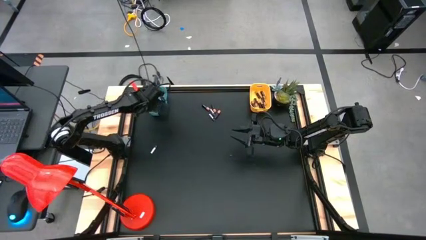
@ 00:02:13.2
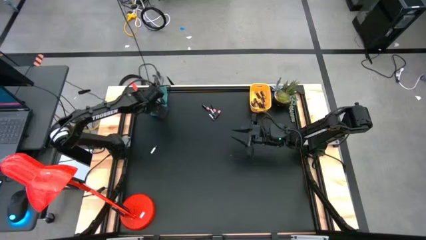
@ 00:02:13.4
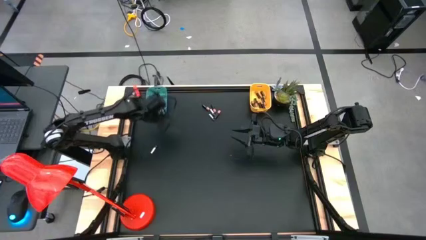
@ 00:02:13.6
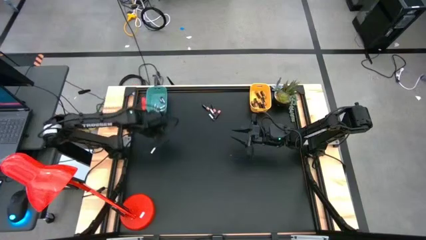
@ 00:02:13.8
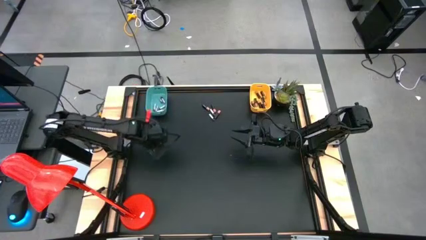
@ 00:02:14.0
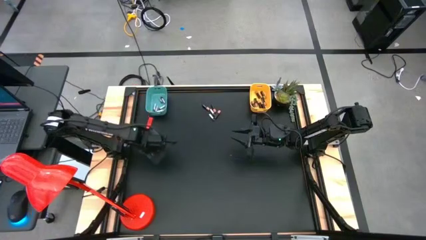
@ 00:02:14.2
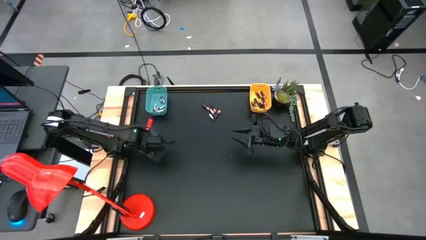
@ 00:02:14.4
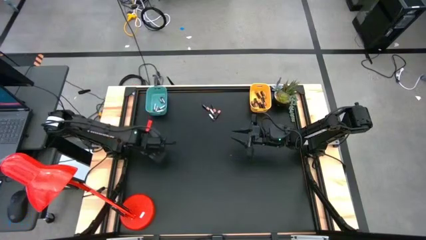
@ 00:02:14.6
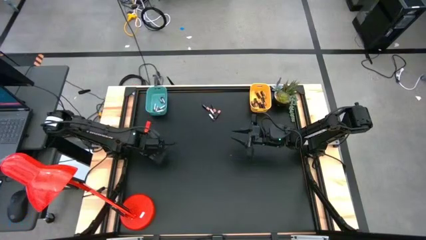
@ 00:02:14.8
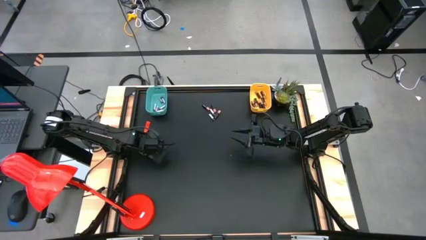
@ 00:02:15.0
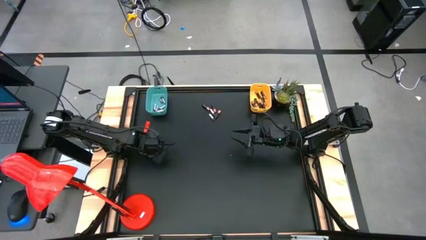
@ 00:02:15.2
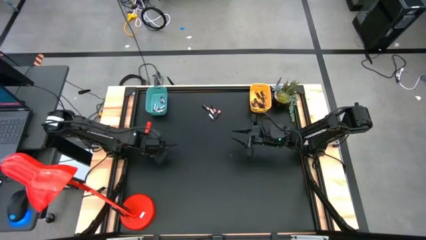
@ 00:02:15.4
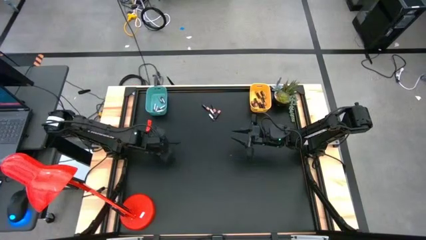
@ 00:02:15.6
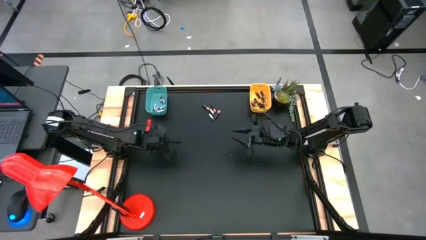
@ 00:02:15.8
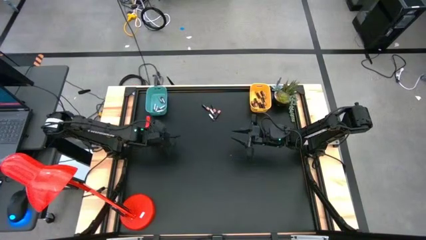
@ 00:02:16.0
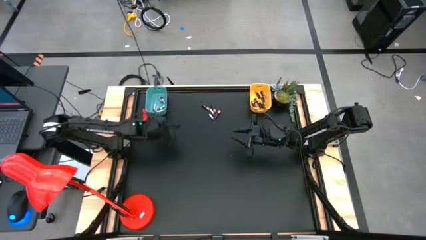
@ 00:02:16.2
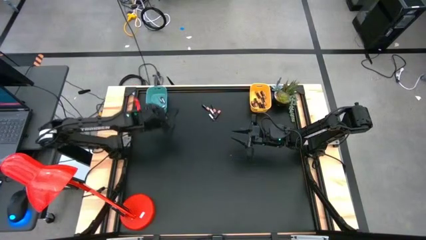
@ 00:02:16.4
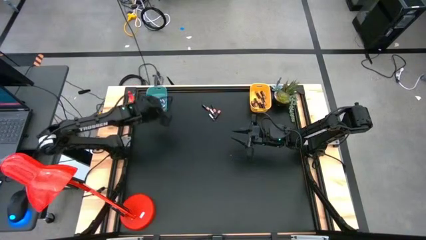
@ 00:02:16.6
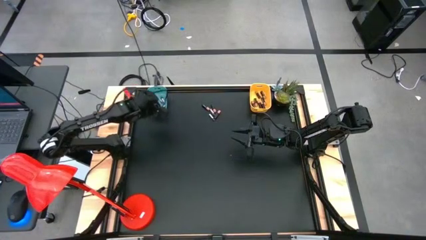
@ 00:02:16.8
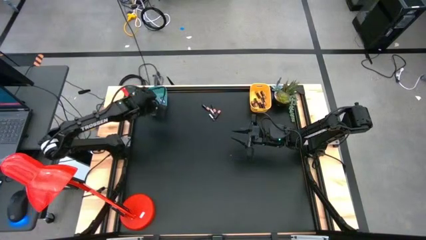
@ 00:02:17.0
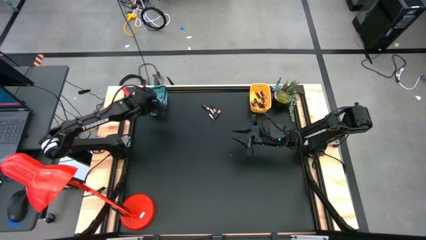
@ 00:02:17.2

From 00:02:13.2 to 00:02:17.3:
Task: Sort batteries
Put the silver battery into the blue bin

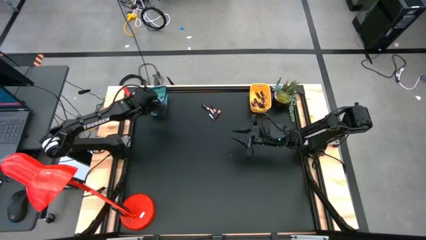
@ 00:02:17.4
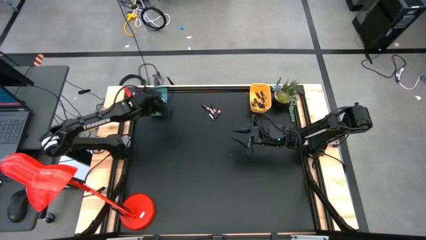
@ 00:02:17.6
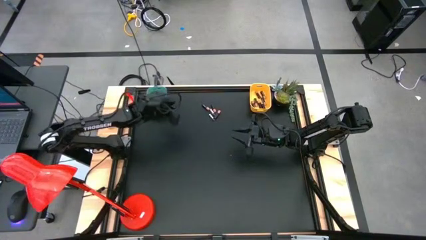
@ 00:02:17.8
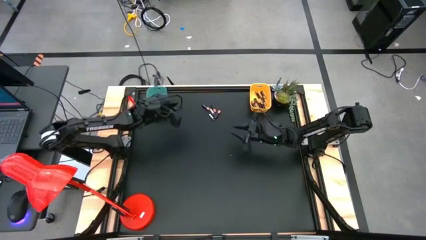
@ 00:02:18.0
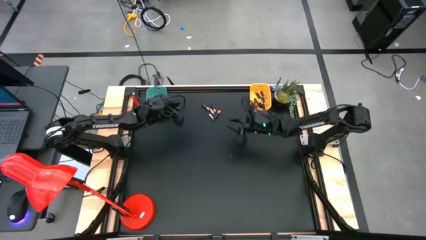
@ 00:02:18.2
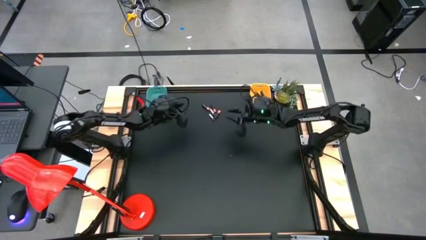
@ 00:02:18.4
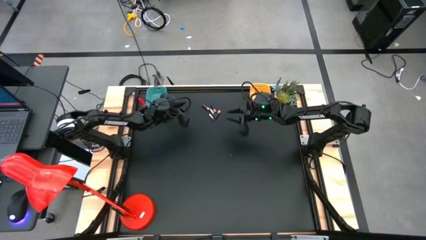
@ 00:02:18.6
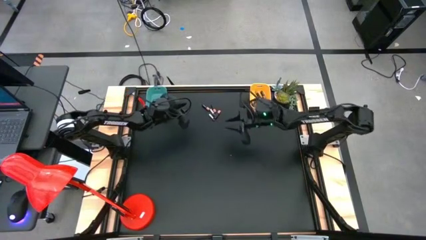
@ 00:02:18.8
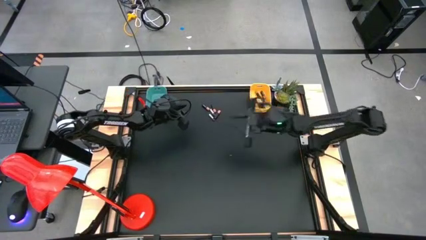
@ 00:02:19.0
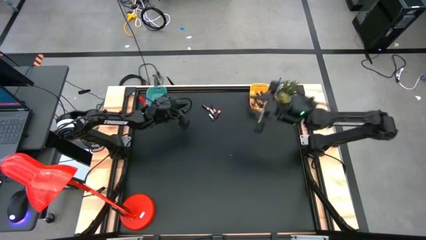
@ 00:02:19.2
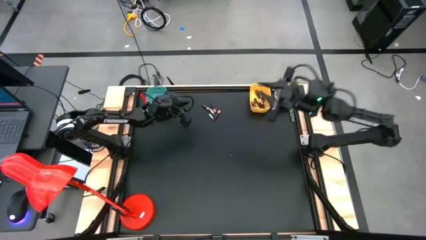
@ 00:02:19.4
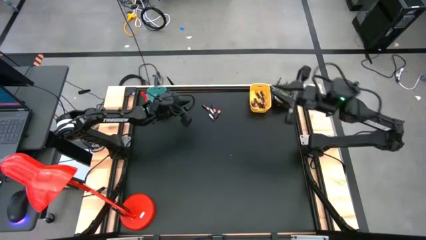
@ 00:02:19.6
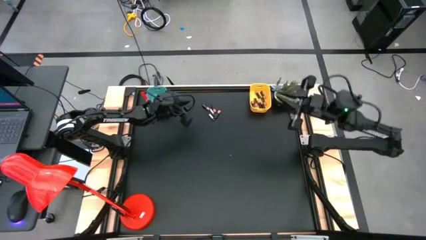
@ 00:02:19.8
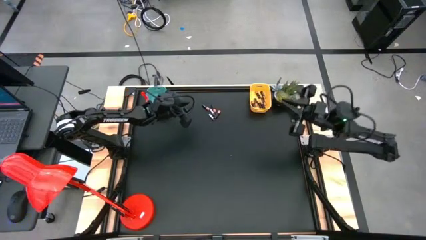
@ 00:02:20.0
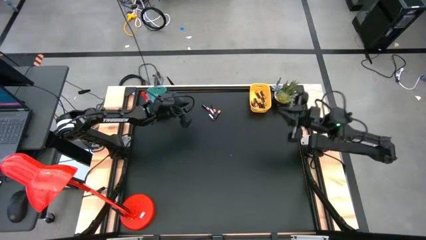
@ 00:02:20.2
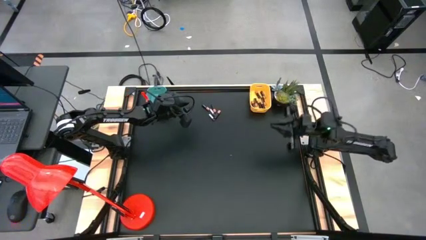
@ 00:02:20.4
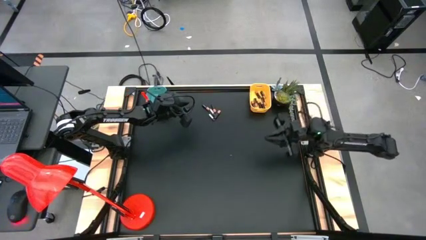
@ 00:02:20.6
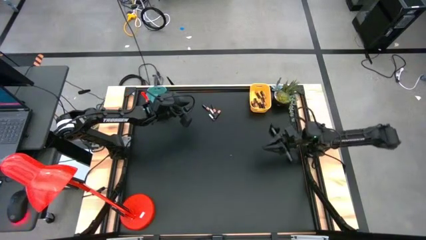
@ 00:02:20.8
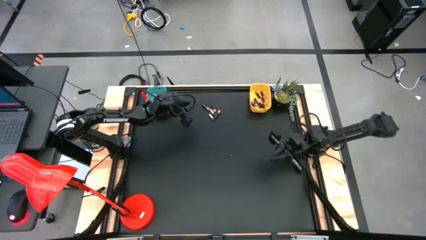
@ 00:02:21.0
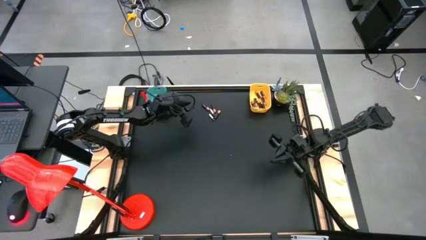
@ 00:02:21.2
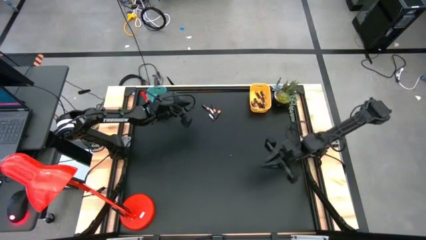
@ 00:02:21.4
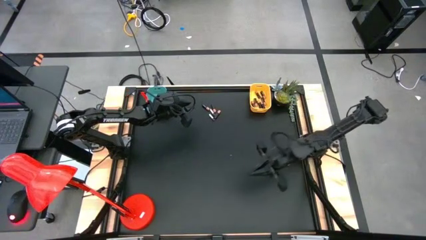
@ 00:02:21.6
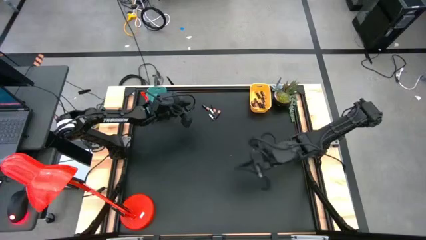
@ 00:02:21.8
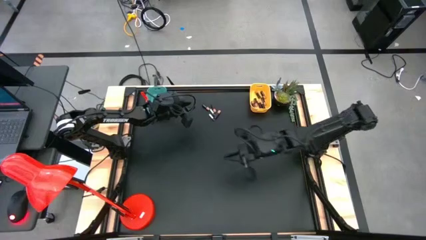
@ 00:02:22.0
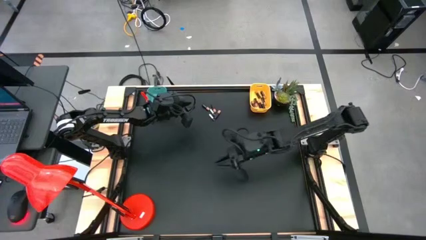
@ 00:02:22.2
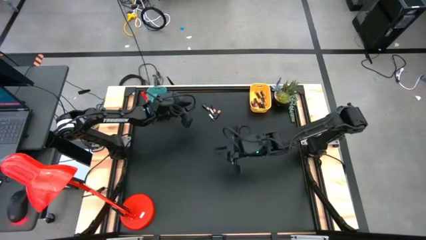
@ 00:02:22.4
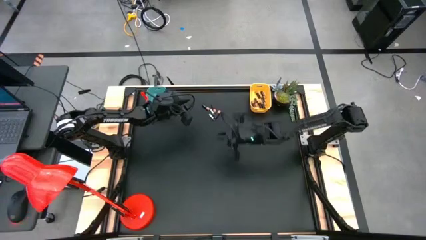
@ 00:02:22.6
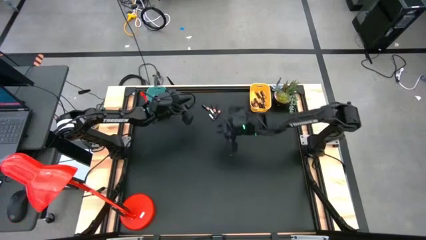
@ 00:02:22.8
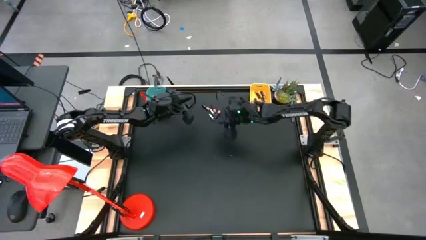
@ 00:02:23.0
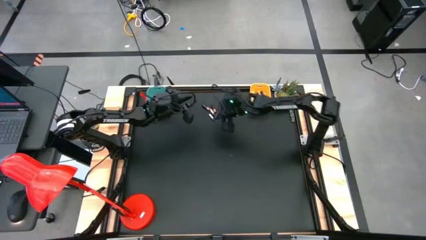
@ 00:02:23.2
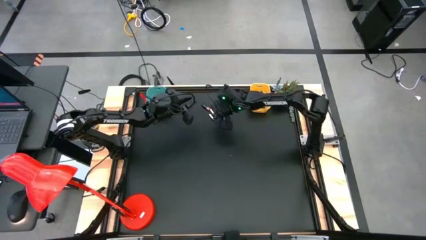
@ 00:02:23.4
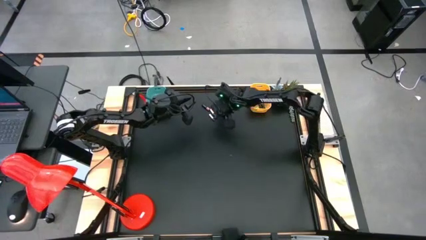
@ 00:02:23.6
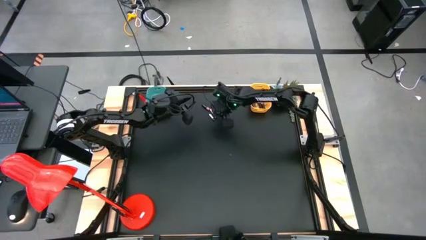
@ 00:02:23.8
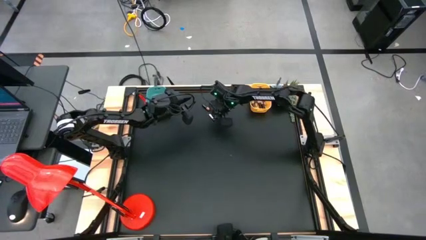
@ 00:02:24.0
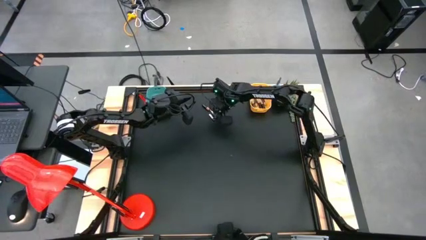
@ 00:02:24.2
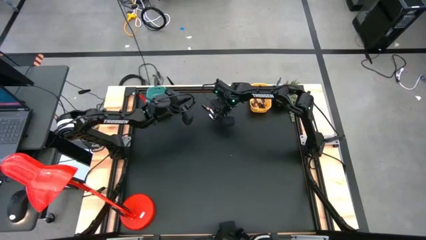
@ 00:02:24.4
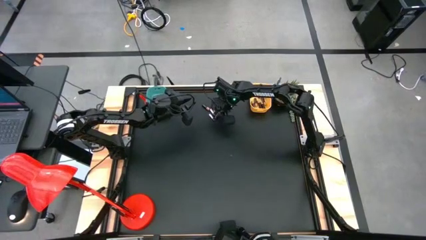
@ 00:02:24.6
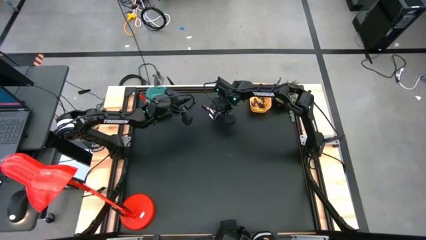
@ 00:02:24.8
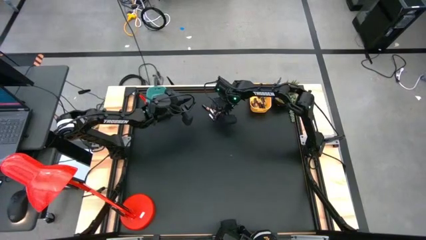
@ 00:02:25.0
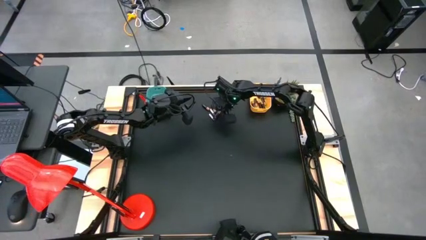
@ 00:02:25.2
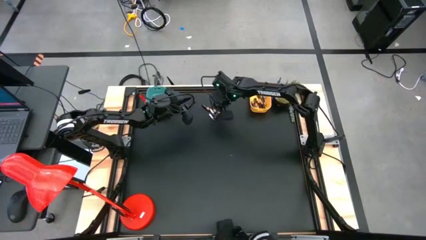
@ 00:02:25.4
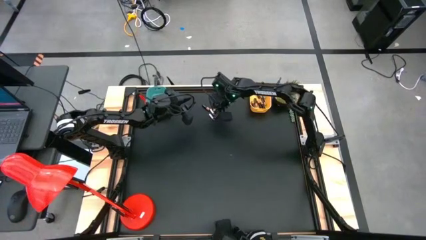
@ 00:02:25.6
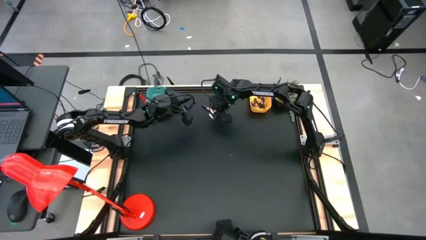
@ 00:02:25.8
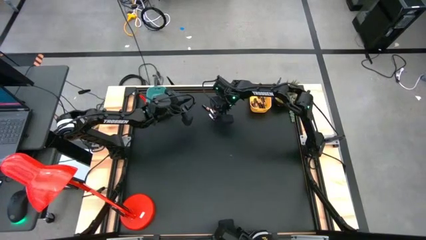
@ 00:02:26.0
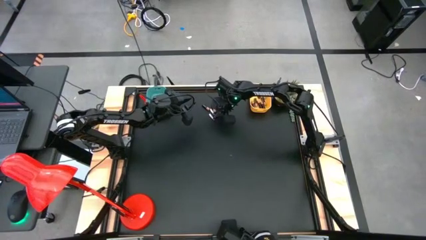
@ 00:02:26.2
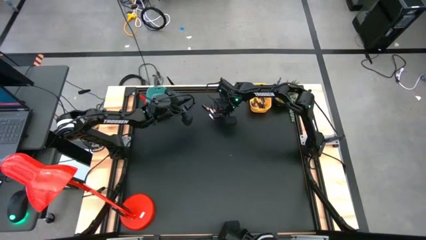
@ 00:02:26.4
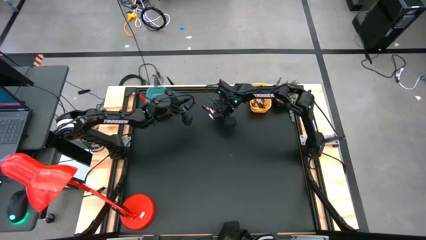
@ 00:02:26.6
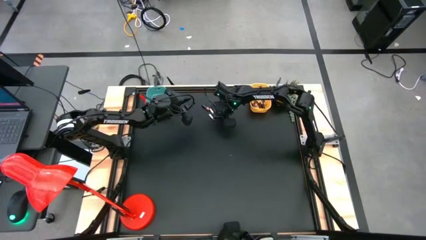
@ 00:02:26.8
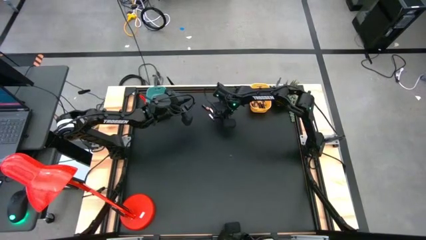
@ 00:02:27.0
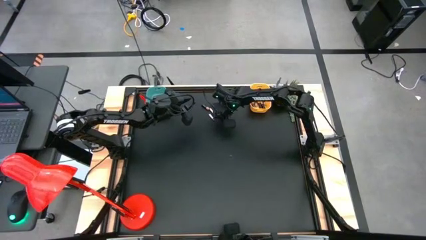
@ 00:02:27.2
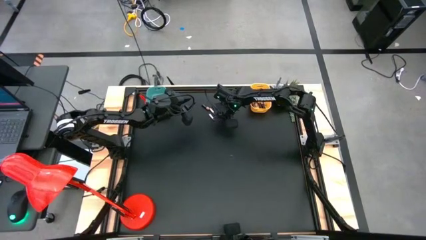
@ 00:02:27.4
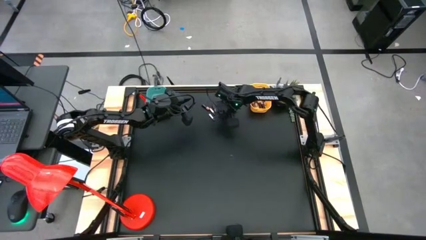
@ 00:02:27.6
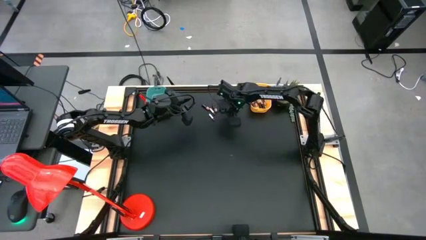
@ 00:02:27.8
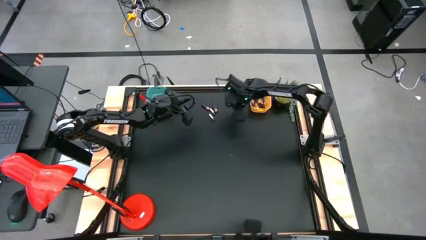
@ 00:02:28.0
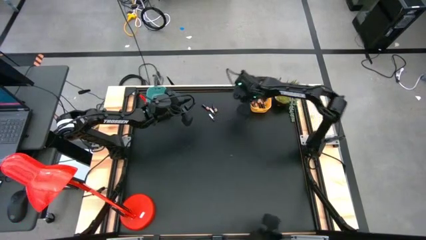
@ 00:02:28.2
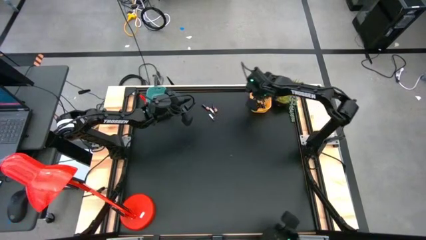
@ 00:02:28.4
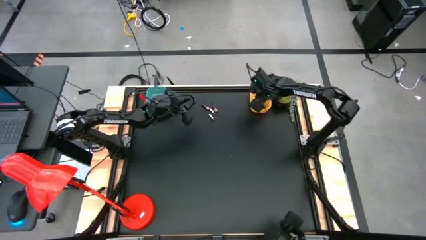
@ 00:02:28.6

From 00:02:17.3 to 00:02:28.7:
Put the black battery into the yellow bin
